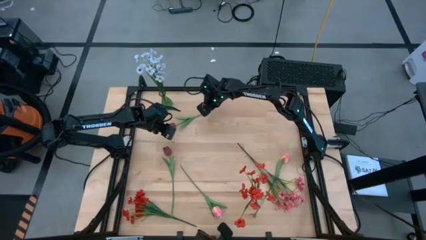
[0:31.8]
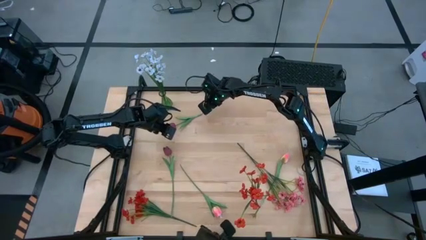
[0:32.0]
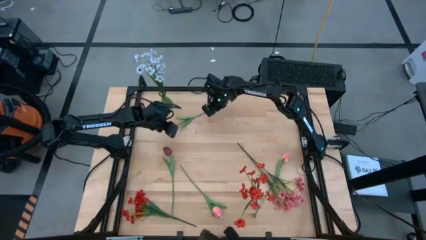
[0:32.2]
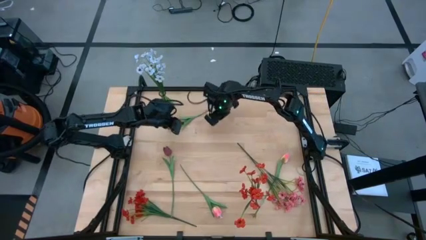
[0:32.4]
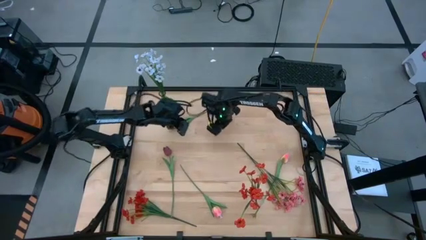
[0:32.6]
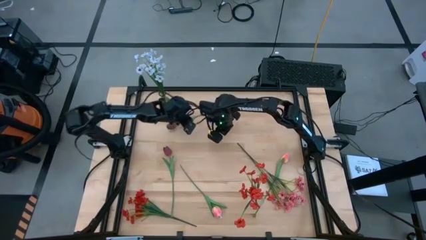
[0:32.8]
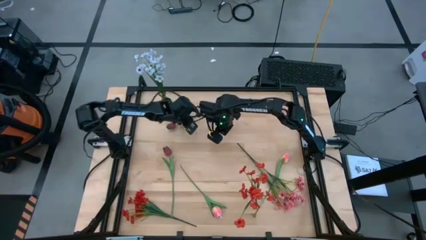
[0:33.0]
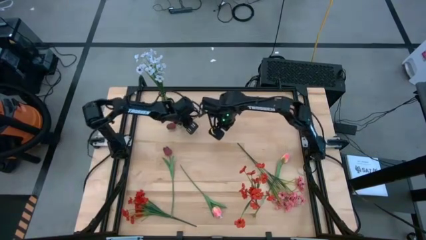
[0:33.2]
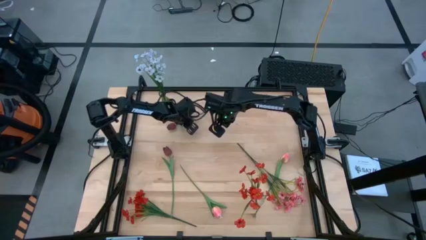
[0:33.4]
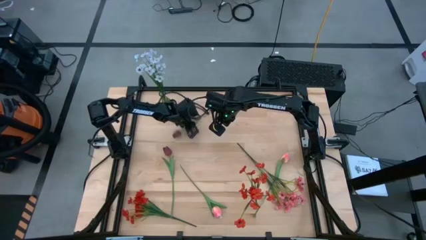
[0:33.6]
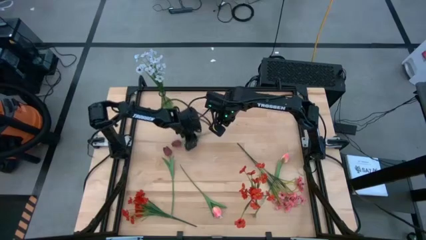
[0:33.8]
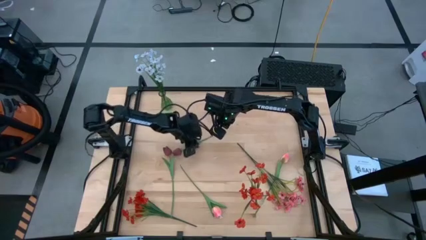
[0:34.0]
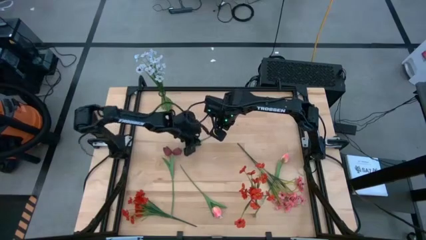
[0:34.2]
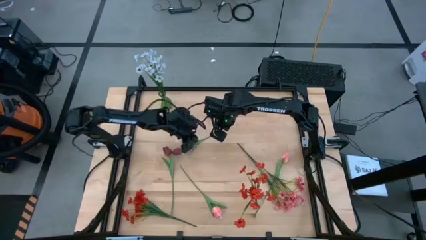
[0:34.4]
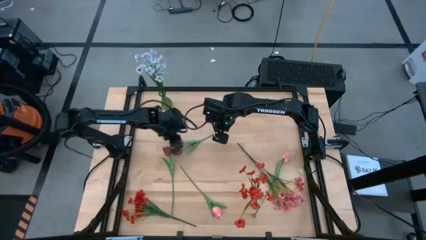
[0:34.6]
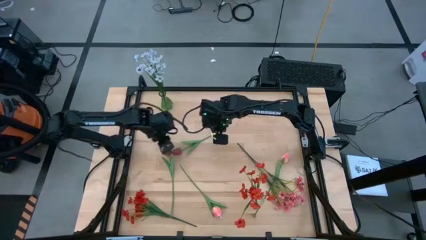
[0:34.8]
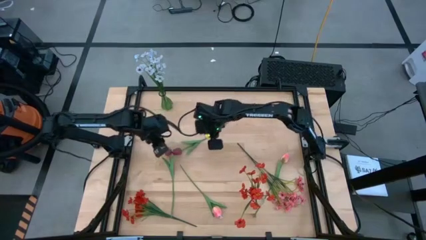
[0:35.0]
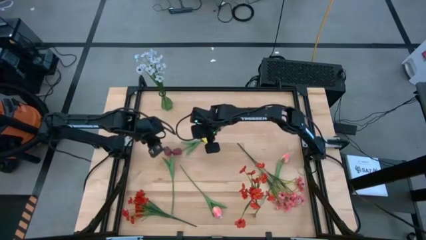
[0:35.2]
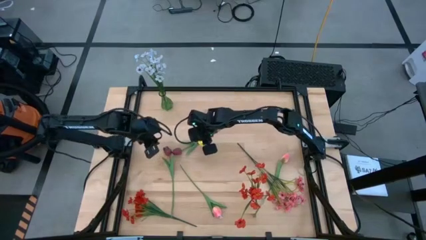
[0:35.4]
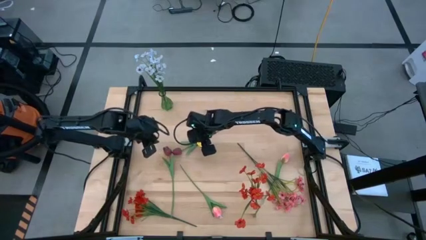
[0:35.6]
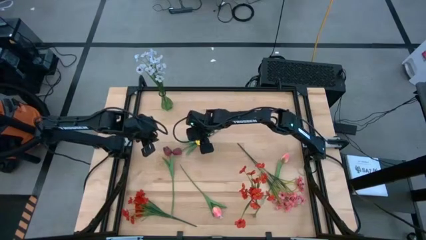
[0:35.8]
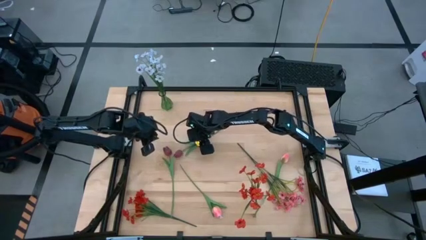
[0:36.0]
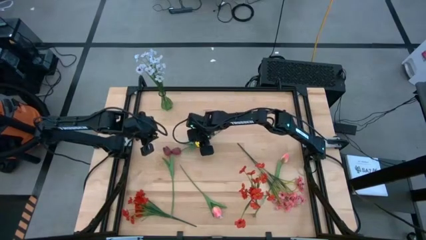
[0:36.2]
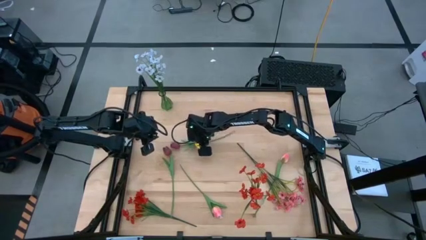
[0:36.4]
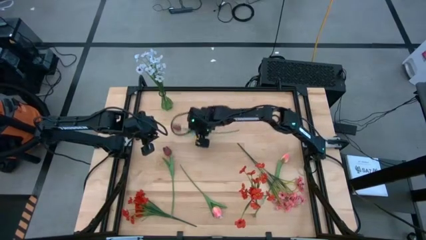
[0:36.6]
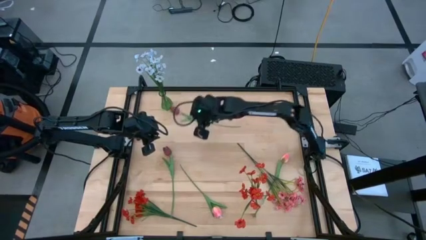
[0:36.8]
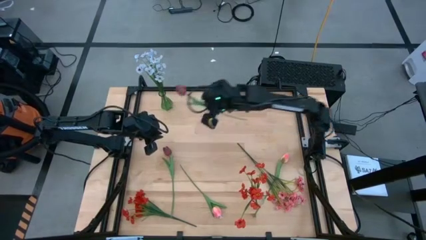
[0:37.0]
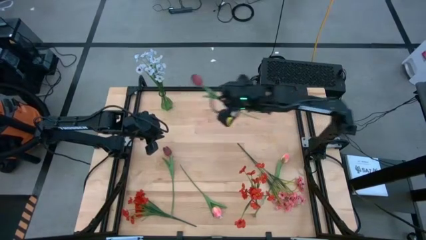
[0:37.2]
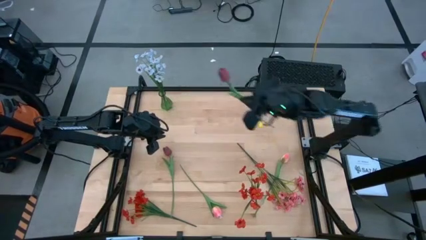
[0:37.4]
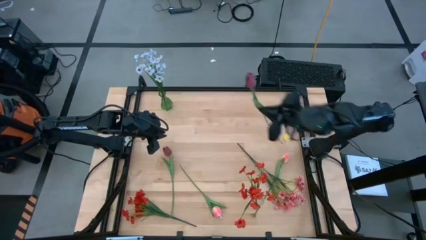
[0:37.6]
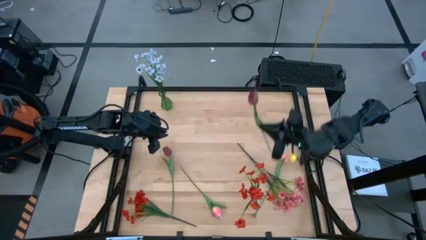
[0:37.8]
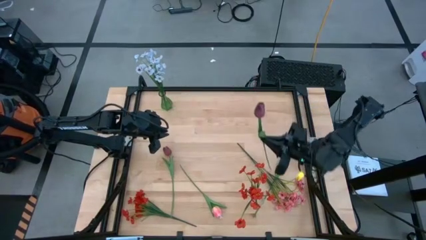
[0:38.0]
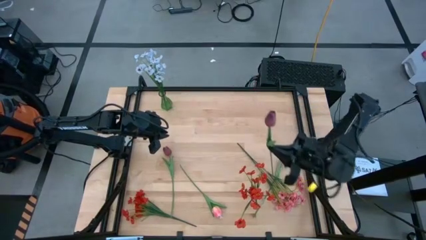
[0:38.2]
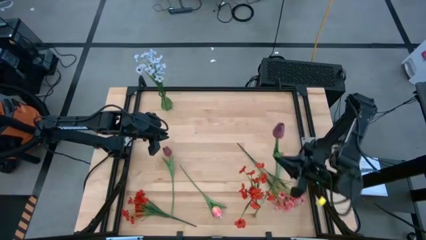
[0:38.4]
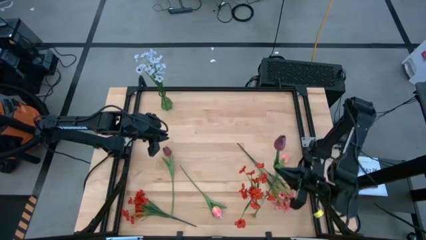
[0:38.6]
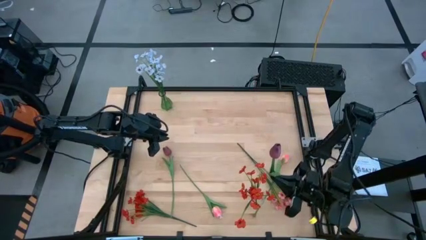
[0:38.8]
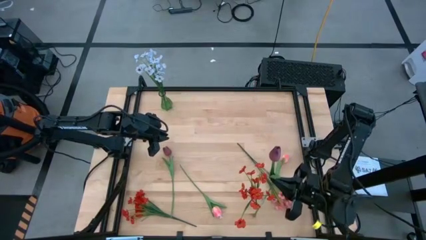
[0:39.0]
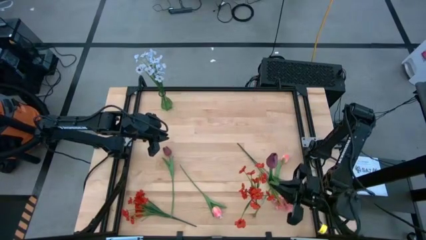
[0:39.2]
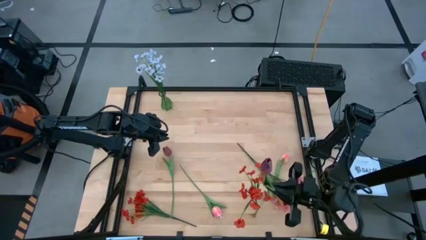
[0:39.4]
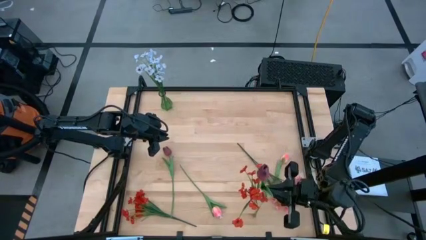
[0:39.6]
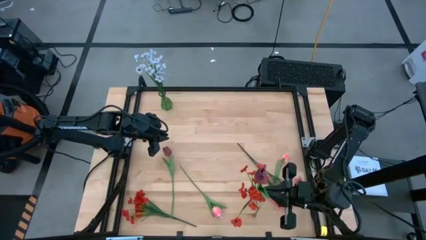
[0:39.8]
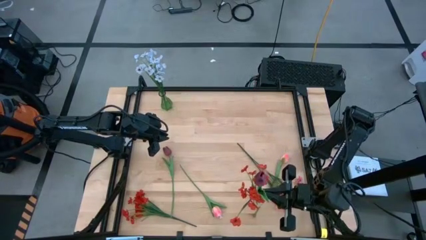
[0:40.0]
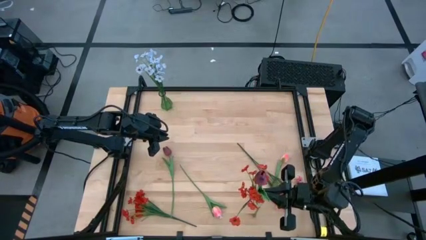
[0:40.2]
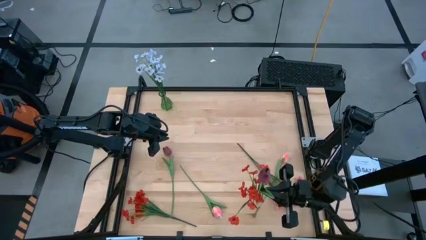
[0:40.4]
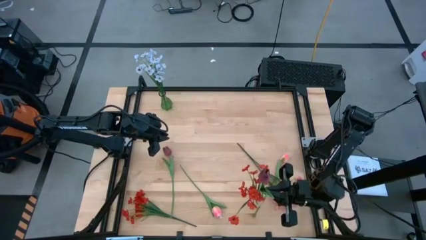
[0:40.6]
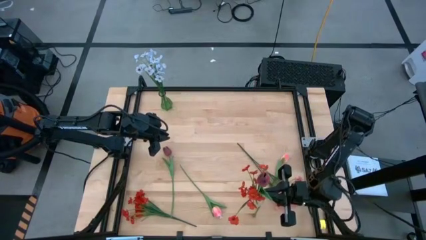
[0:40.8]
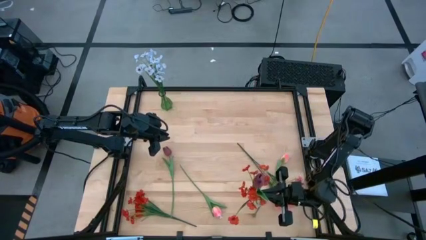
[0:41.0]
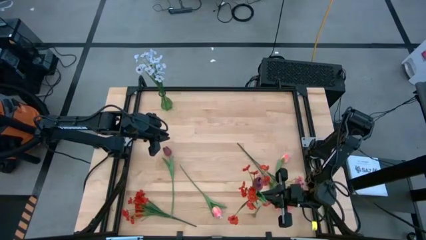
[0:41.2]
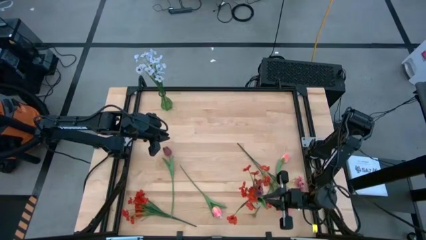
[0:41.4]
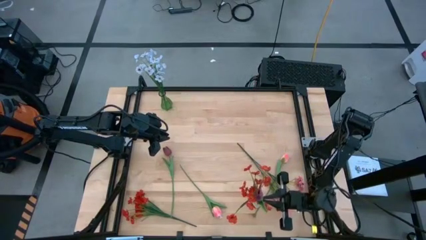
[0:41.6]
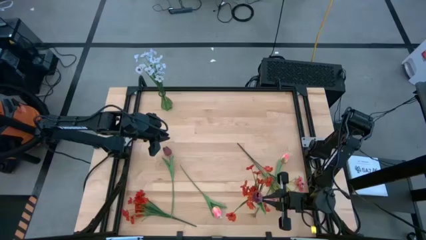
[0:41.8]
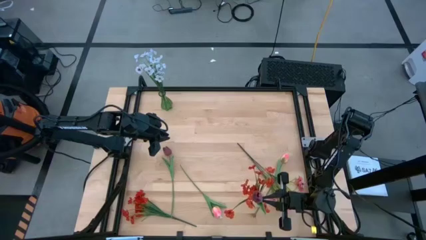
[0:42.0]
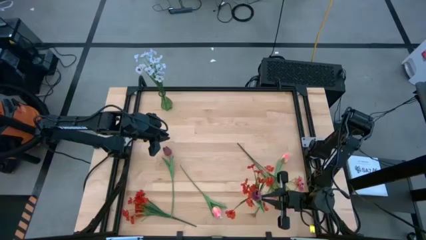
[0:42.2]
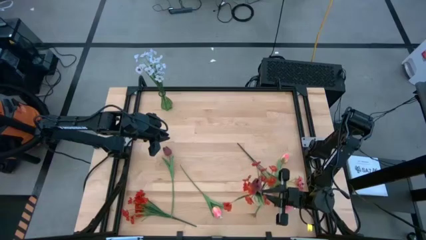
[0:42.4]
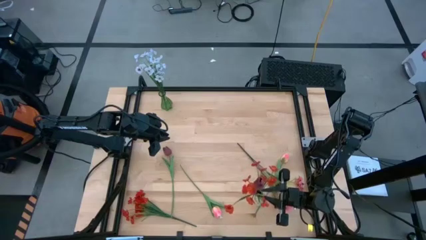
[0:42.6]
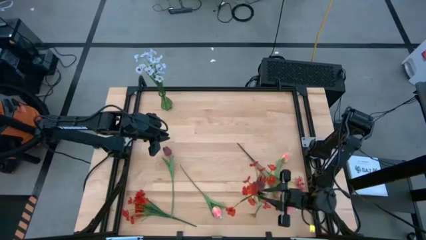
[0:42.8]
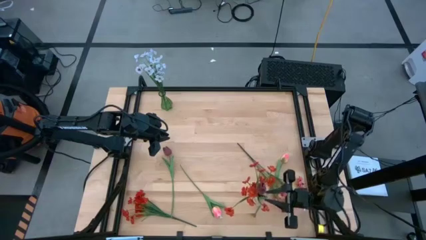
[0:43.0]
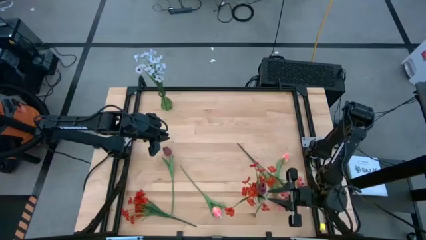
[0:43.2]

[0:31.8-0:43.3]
Task: Sort flowers into vase by color
Put the top red tulip into the transparent vase
